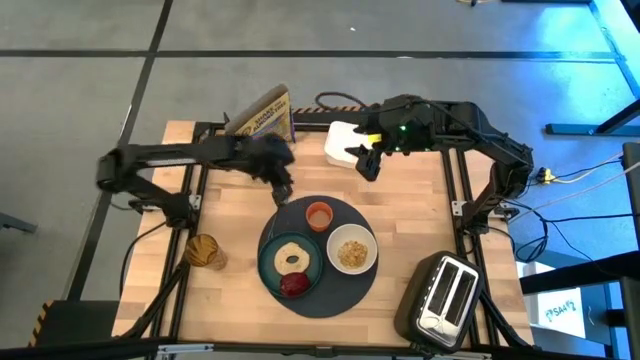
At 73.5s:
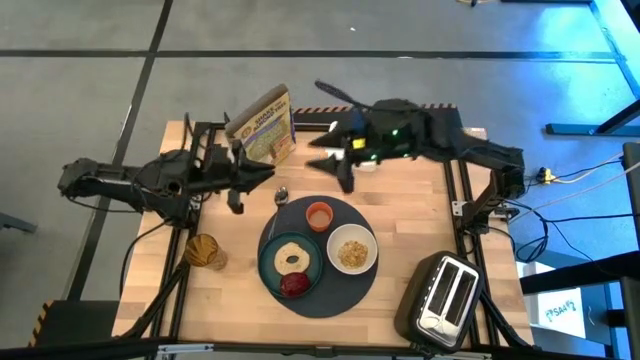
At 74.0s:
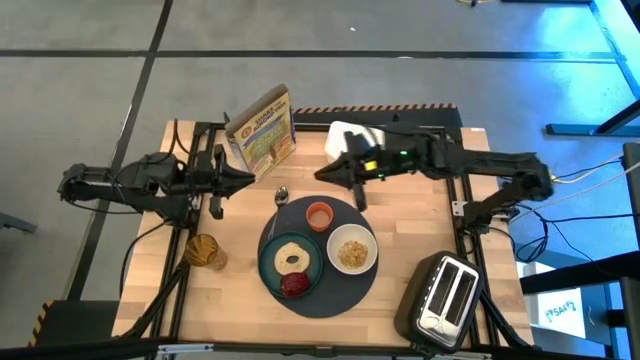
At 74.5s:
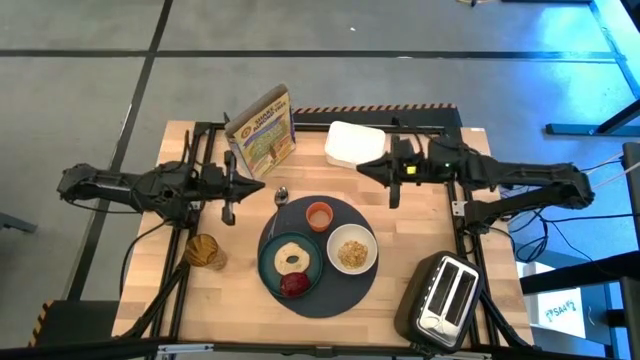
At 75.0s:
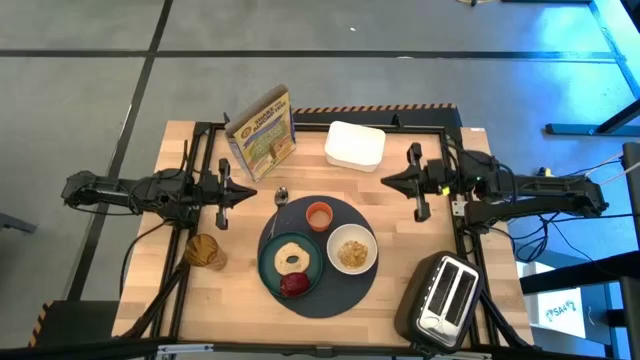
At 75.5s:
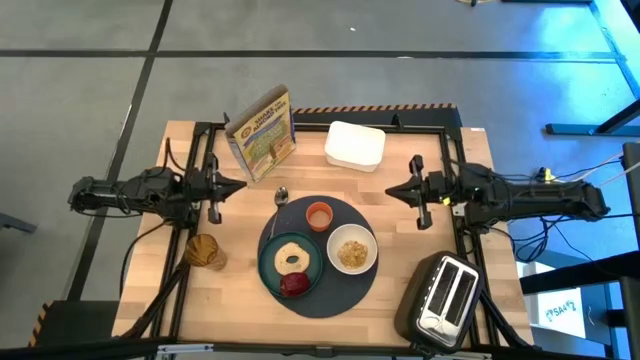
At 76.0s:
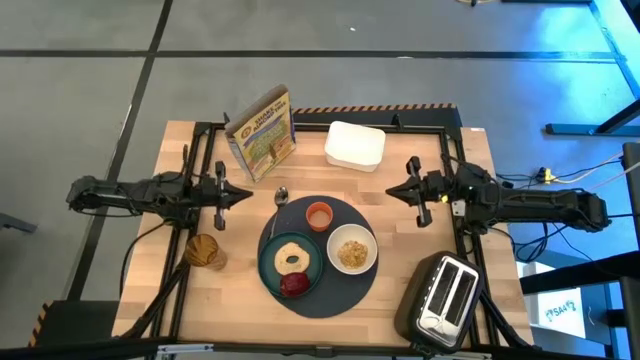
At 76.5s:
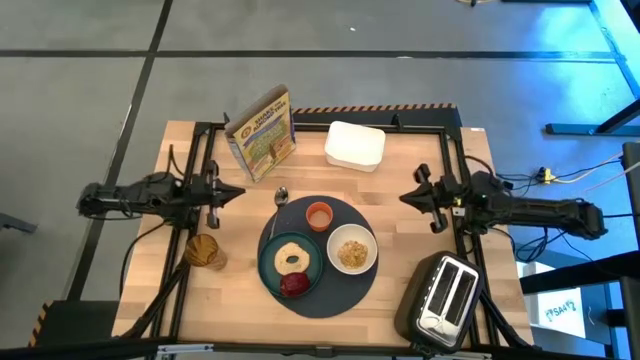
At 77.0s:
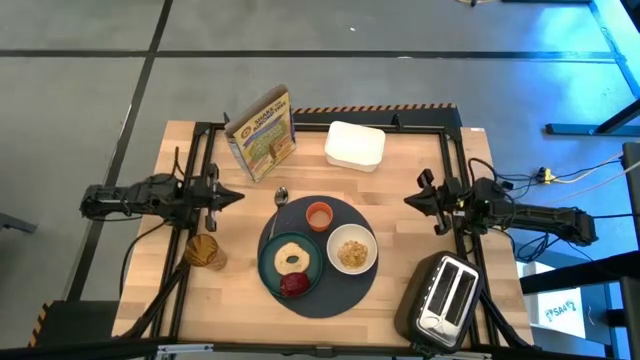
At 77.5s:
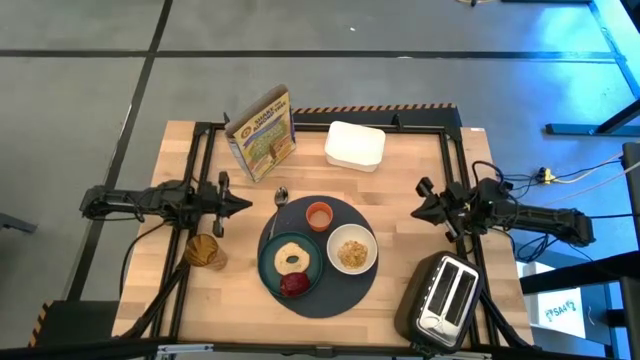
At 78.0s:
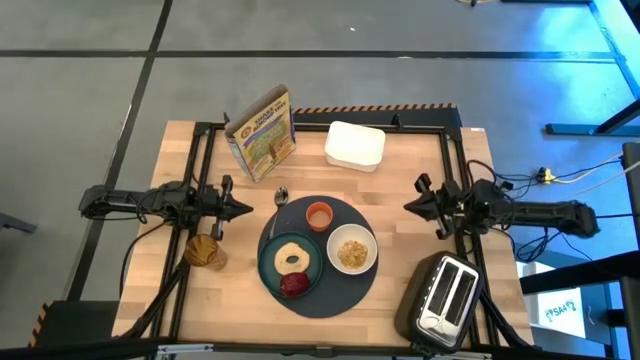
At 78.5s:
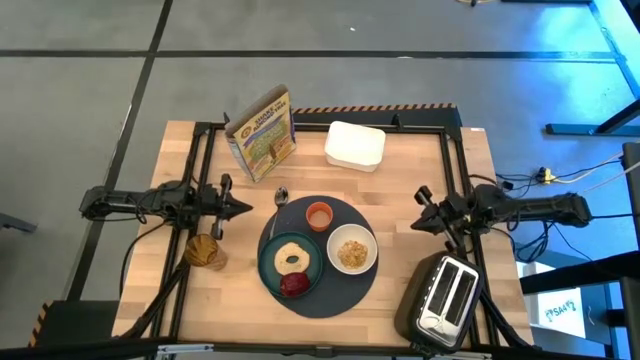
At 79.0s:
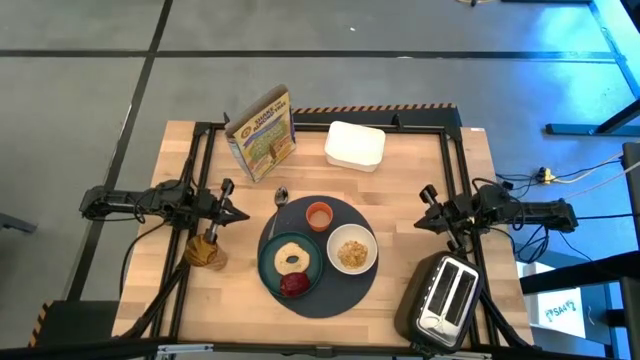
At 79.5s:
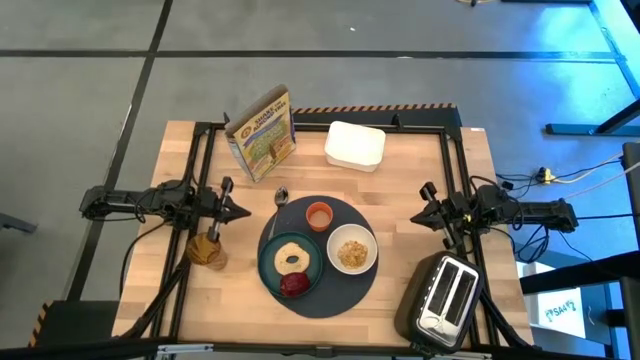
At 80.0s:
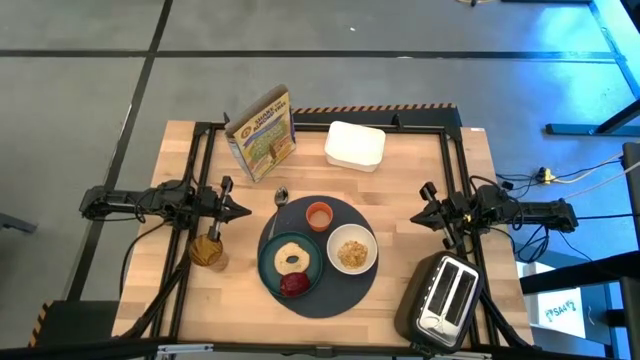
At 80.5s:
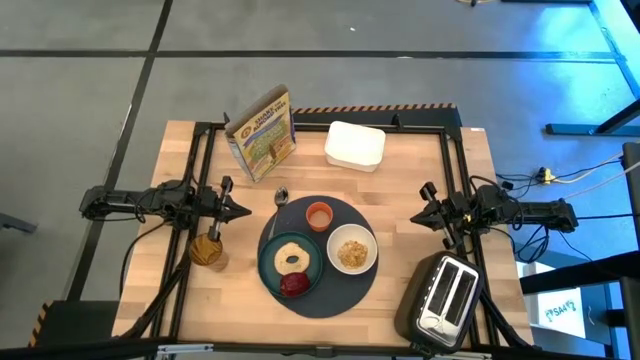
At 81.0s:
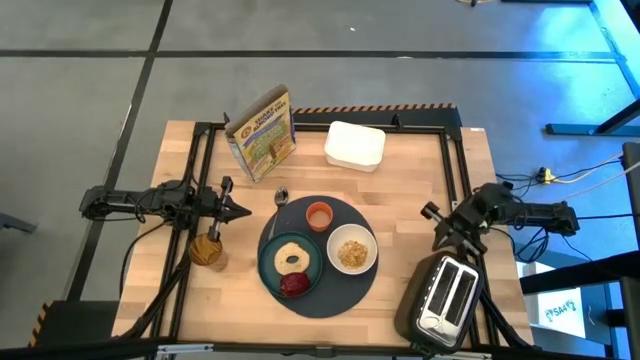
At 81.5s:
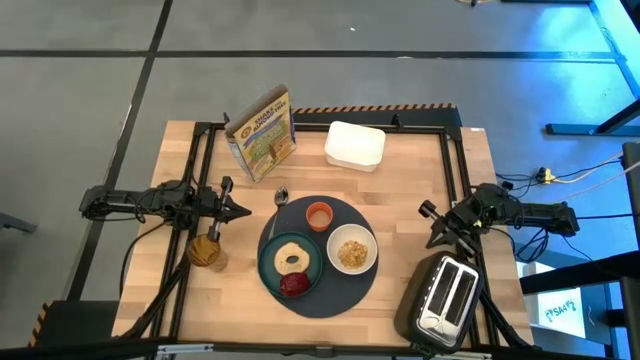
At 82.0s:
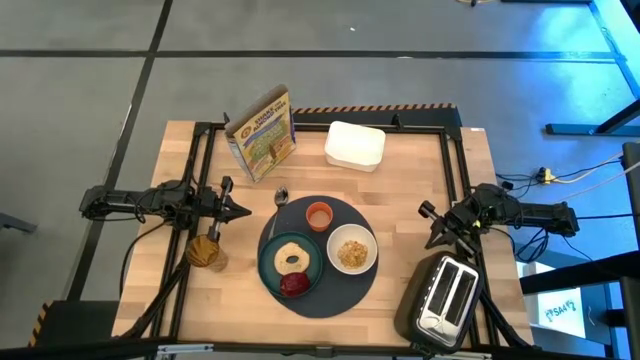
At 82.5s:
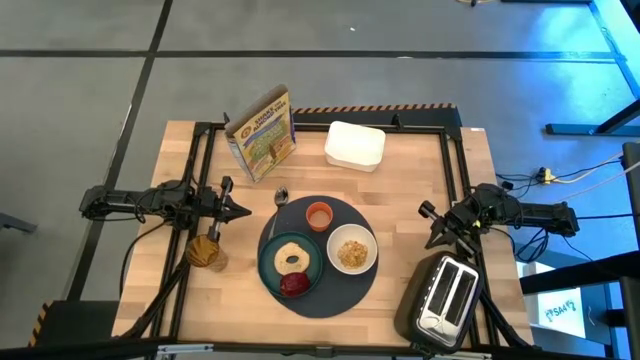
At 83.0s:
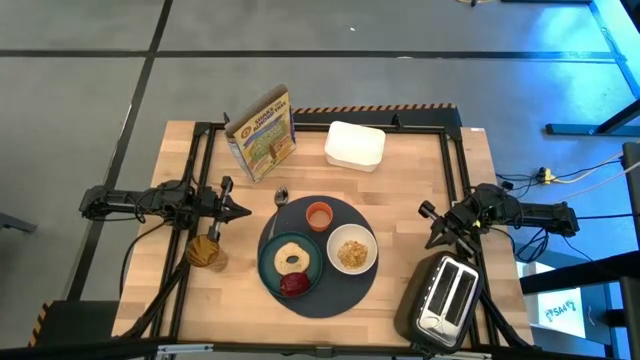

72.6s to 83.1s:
Task: Arrange a breakfast setting
Return to Home Position

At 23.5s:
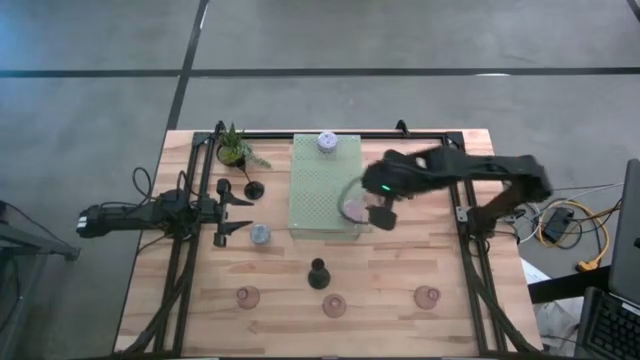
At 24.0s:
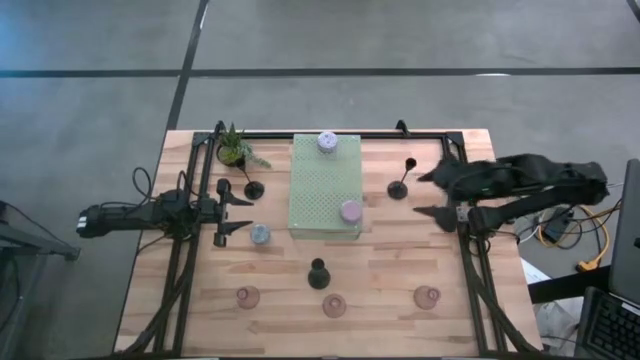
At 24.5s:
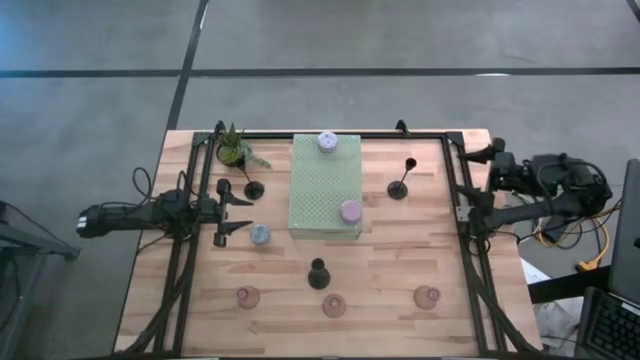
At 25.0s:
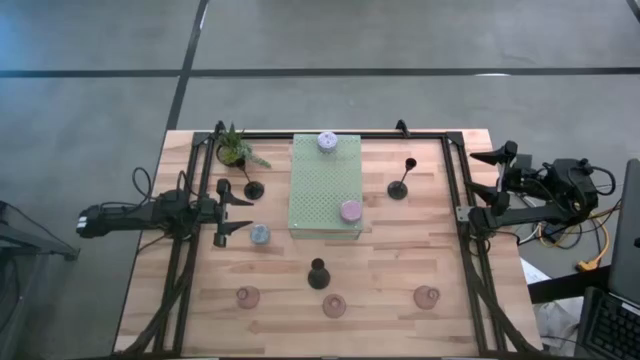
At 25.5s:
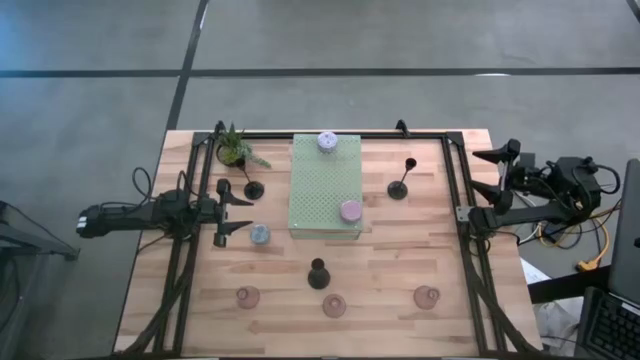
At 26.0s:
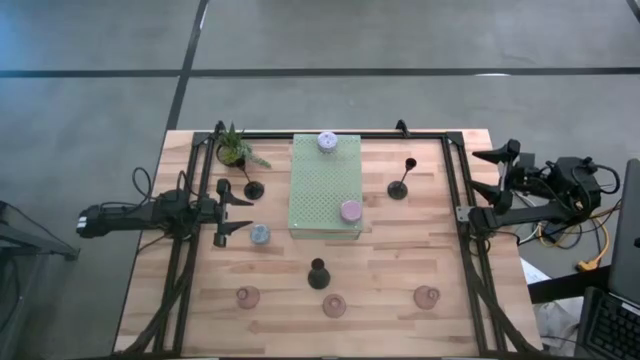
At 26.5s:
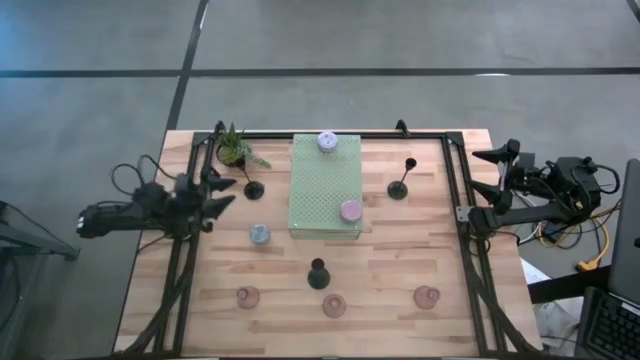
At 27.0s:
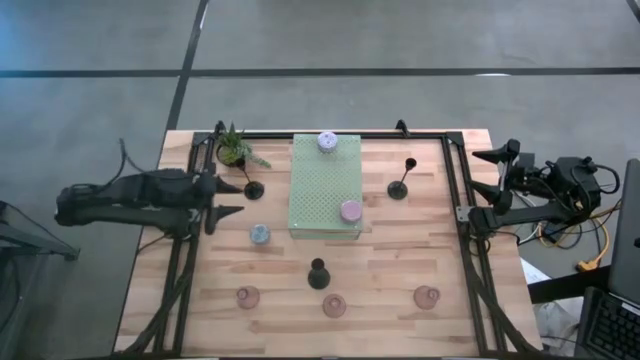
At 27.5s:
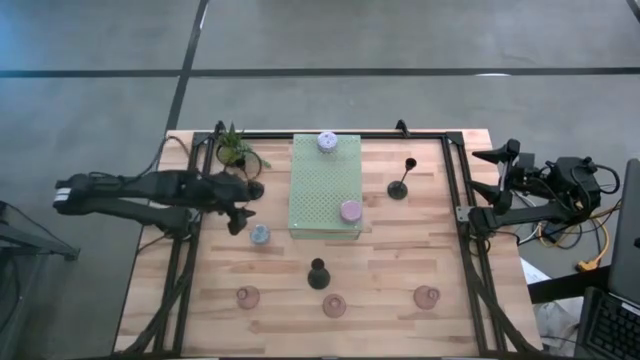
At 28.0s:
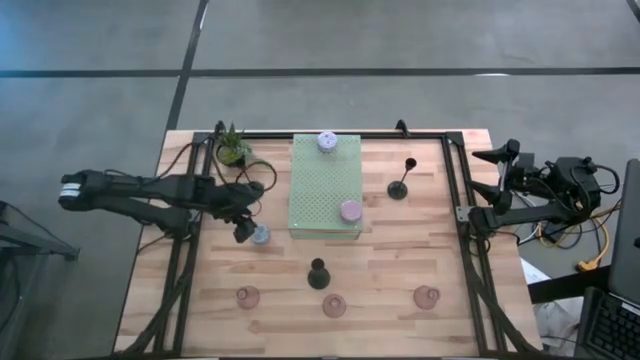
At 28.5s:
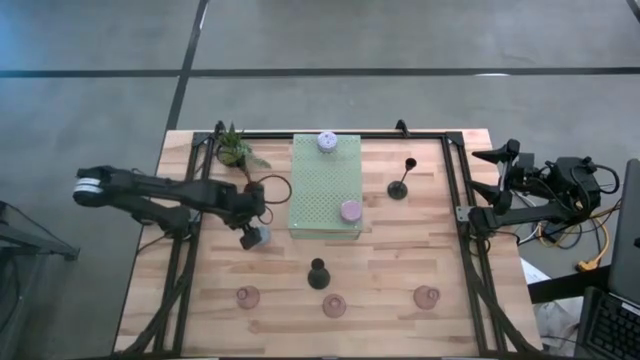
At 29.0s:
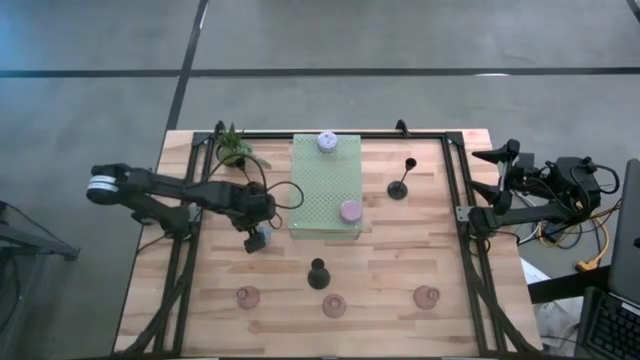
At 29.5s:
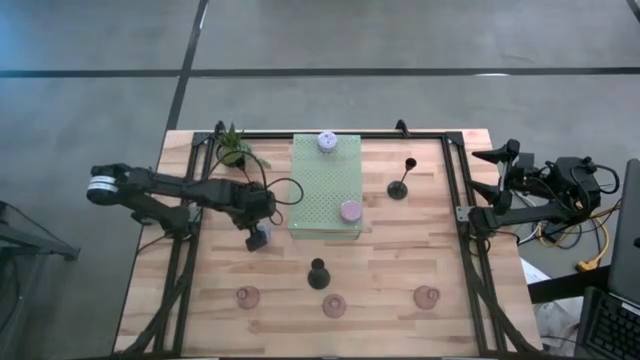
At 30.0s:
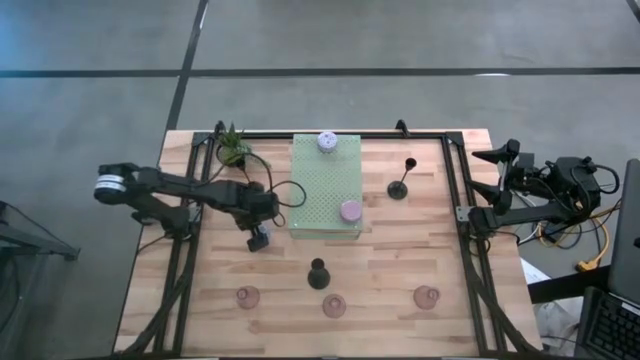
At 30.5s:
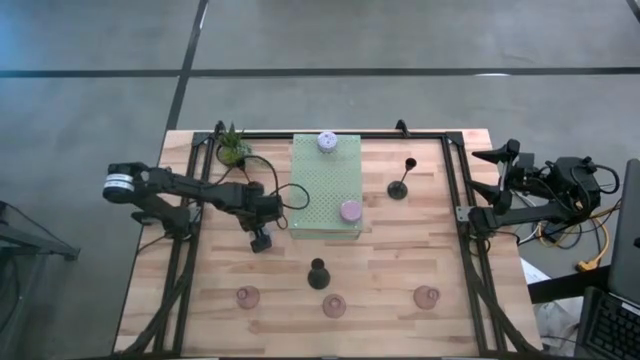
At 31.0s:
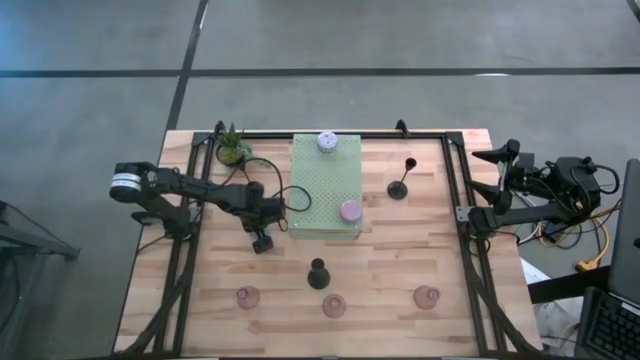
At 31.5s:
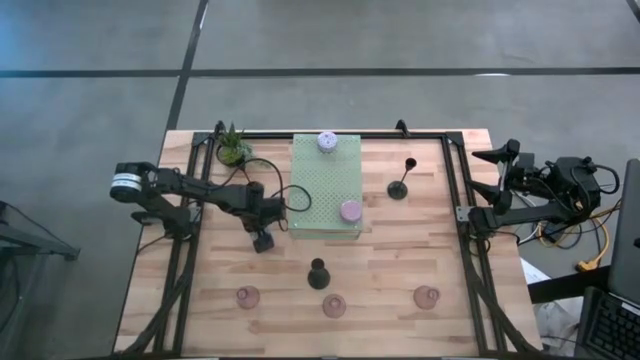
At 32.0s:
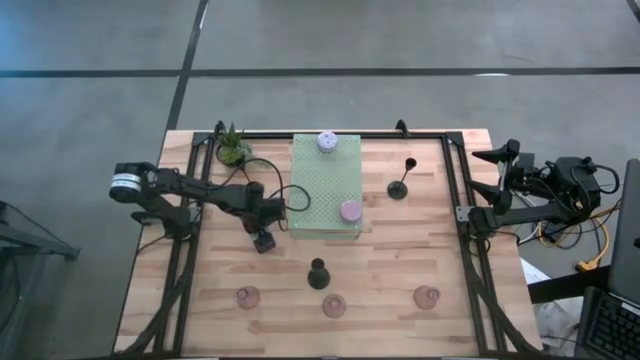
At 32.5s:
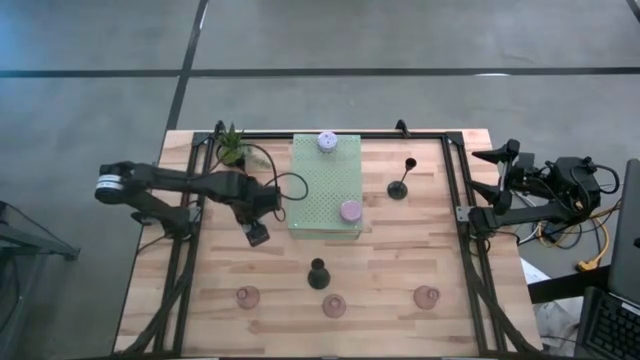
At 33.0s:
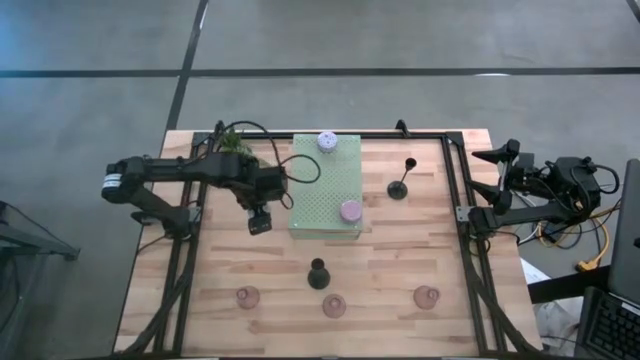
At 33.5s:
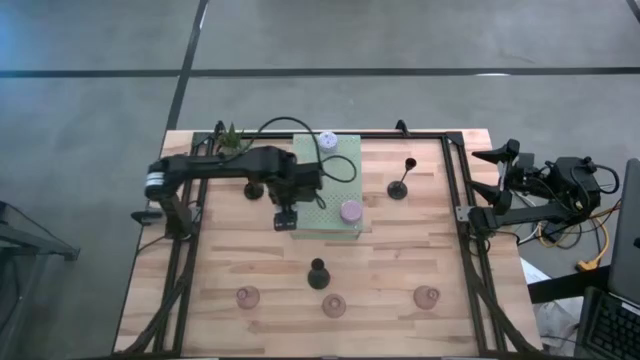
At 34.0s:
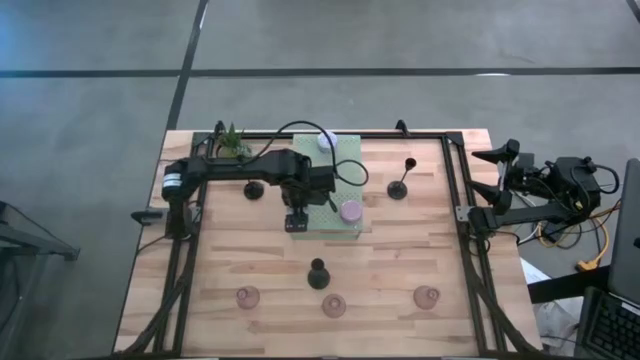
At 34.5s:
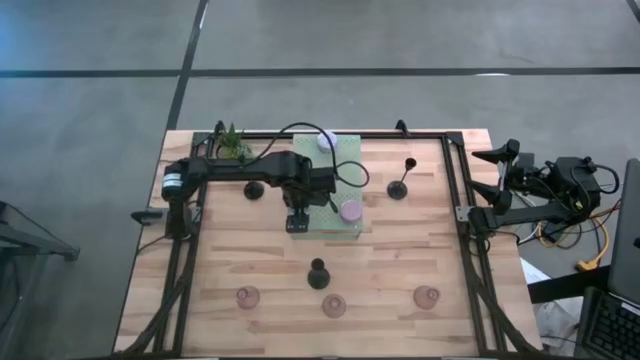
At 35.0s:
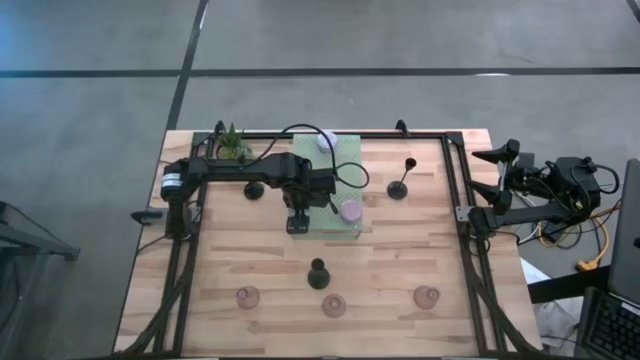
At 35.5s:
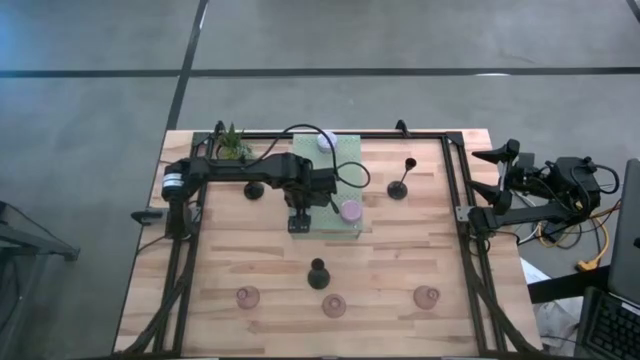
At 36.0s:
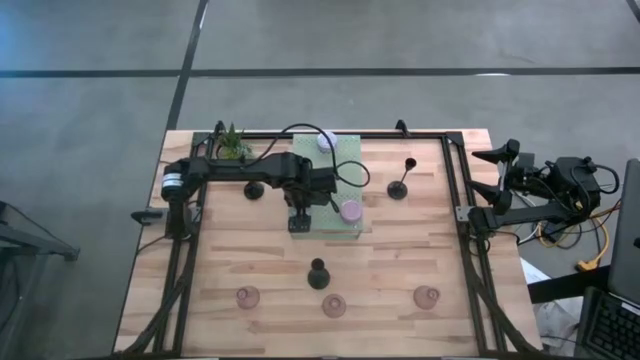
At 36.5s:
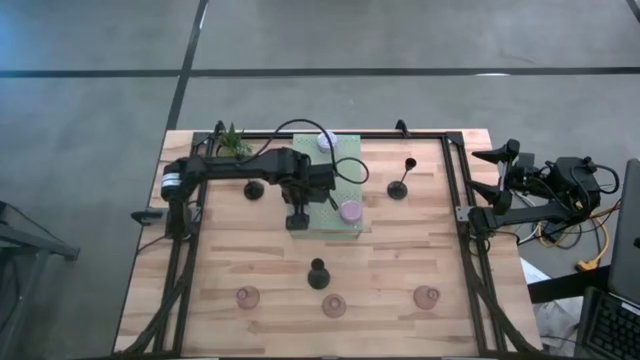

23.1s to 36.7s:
Task: Pick & Place candle stick holders
Put the green and white scented candle on the shelf
